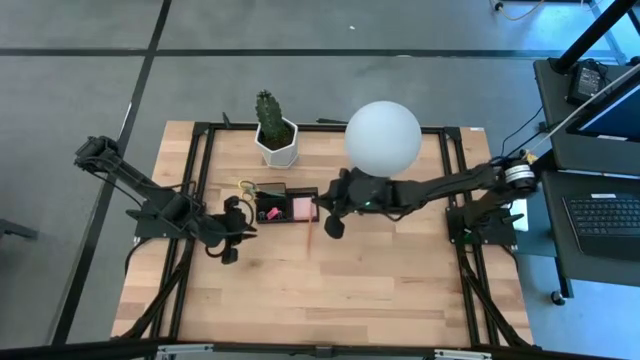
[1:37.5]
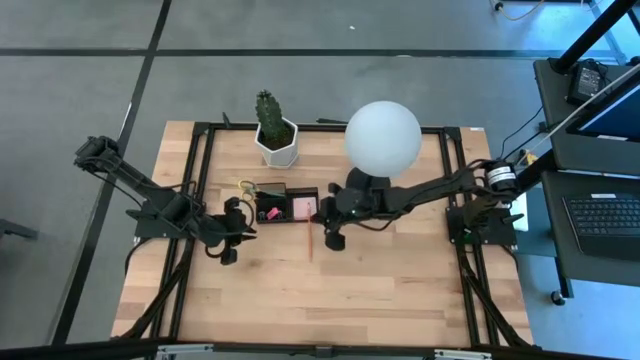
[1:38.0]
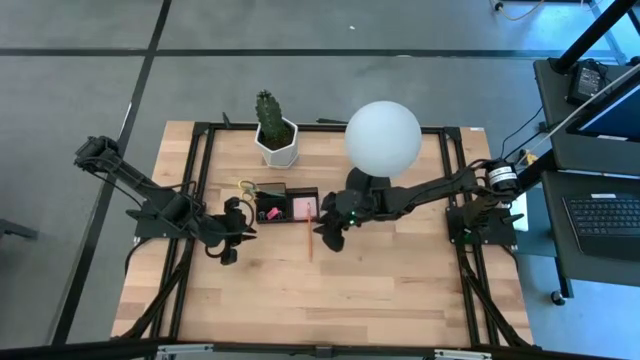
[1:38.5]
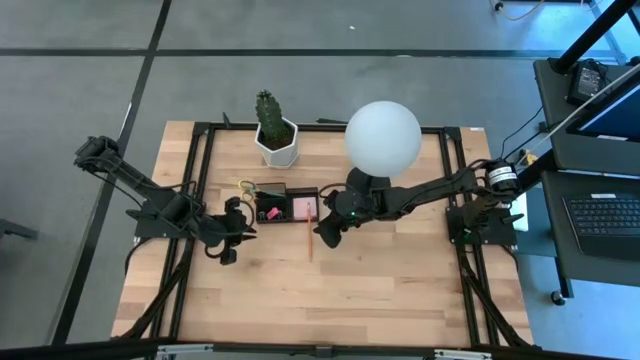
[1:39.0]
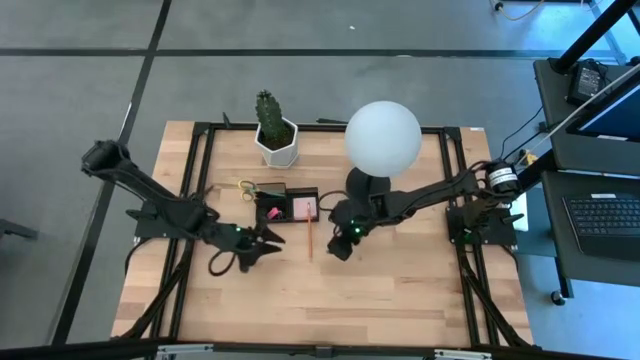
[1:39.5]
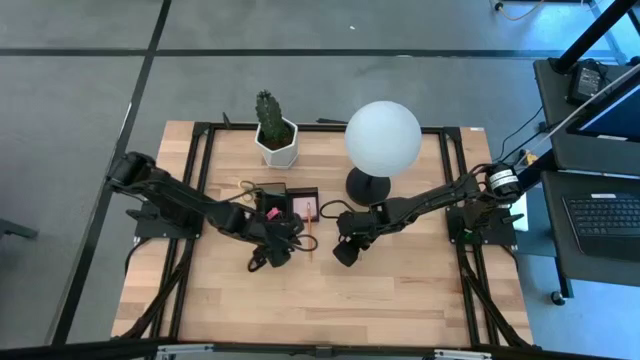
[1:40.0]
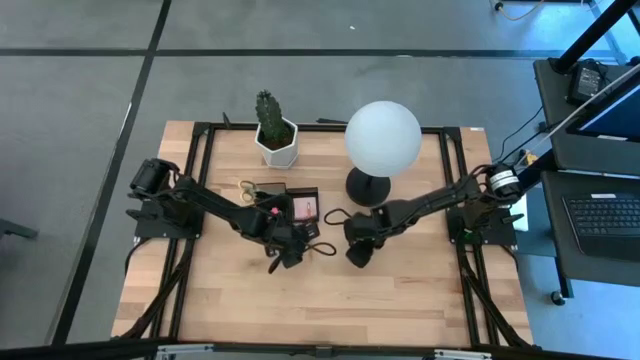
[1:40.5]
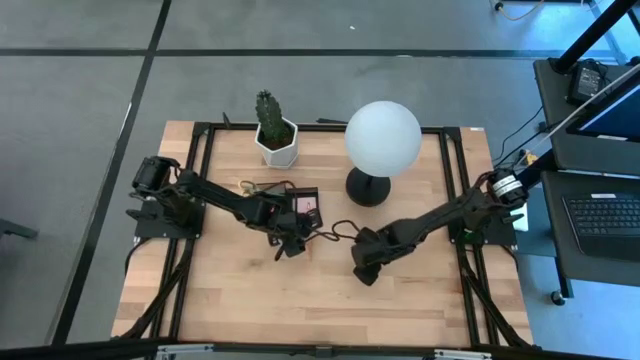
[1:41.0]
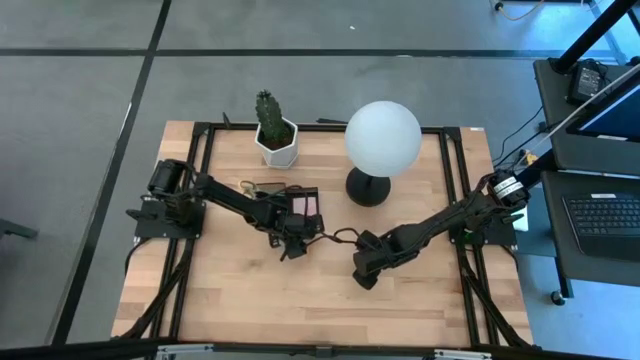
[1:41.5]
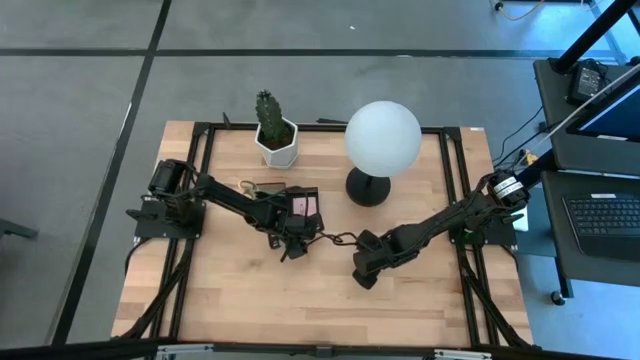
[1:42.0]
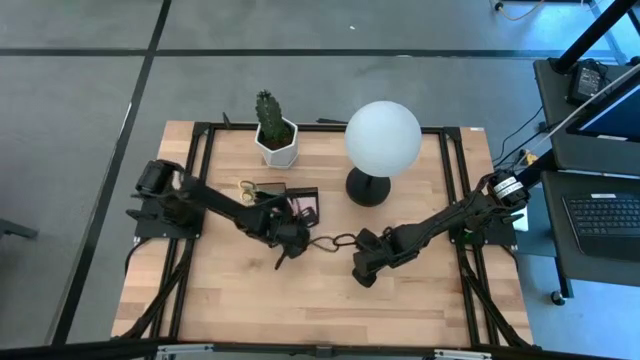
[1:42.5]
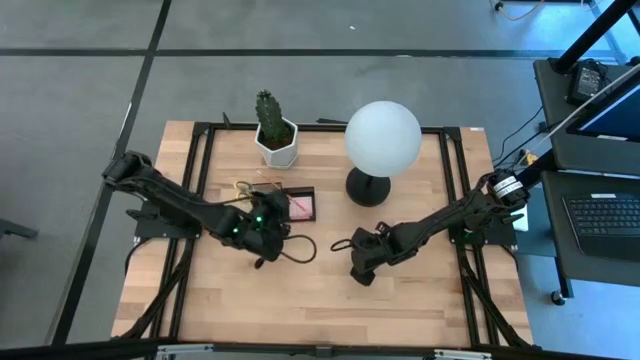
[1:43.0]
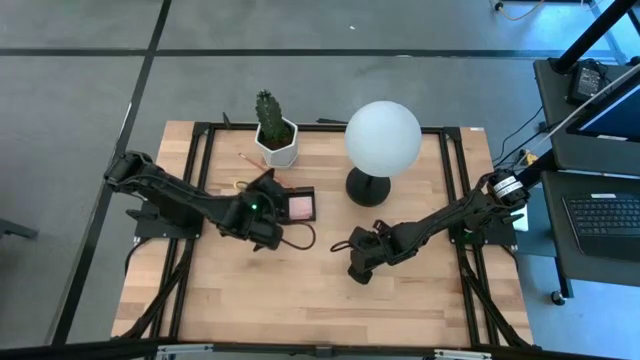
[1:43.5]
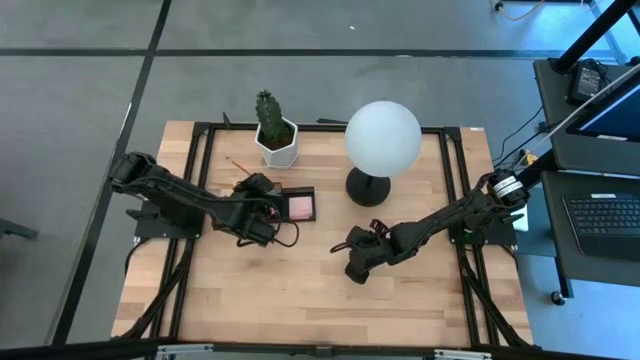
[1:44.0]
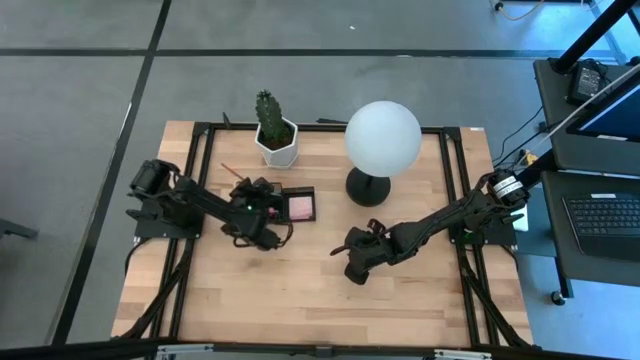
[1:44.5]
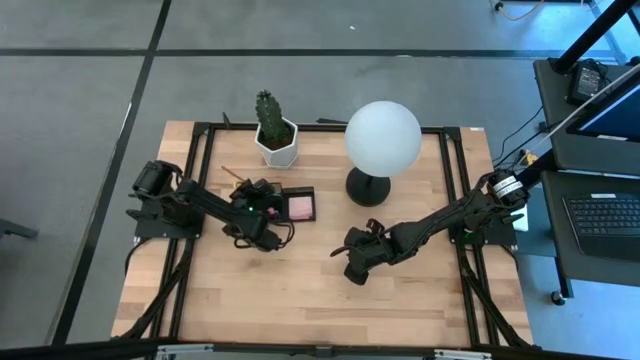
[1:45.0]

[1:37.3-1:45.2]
Task: Pick and place office supplies into organizer
Put the orange pencil into the black desk organizer

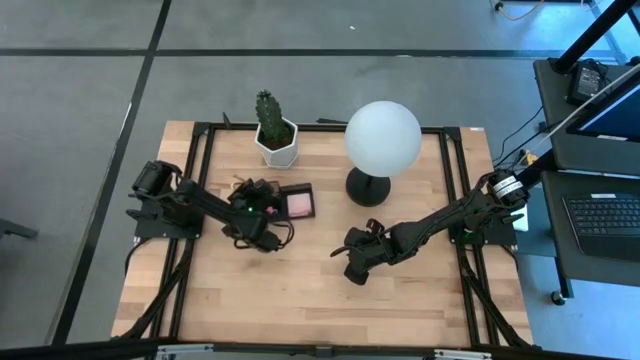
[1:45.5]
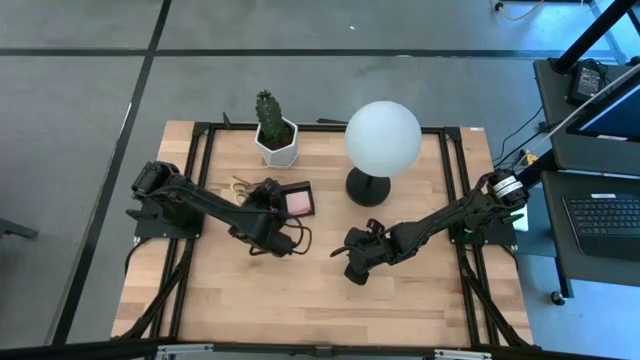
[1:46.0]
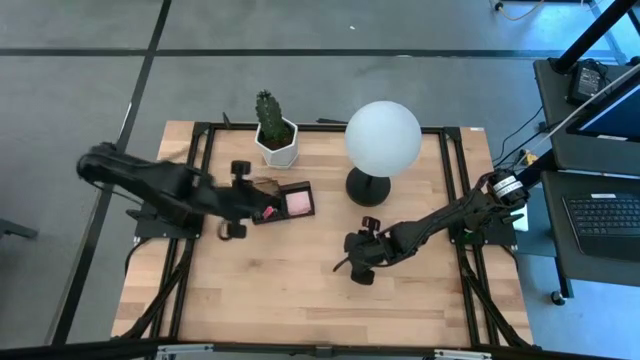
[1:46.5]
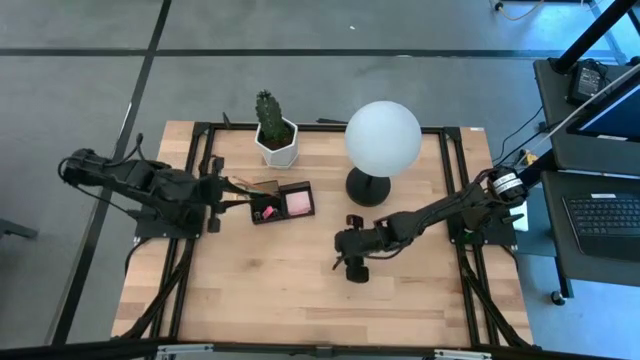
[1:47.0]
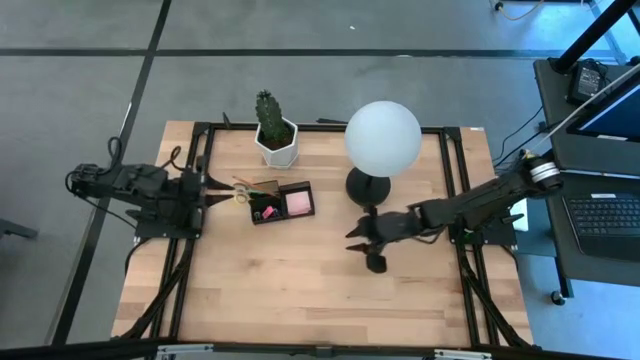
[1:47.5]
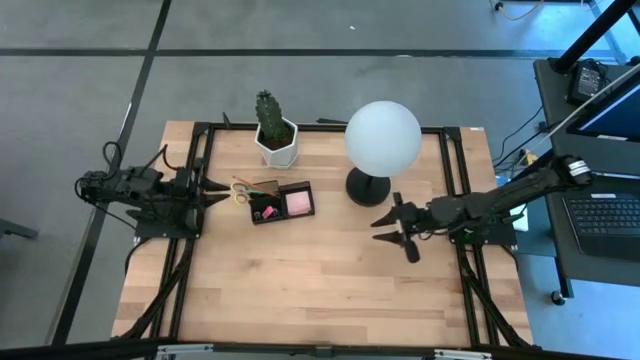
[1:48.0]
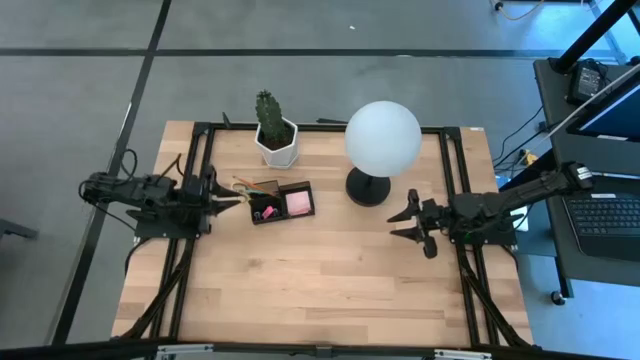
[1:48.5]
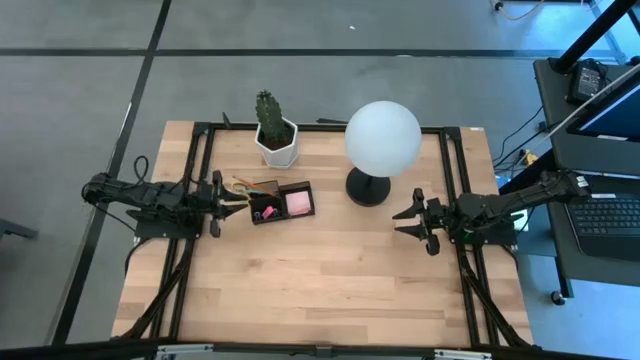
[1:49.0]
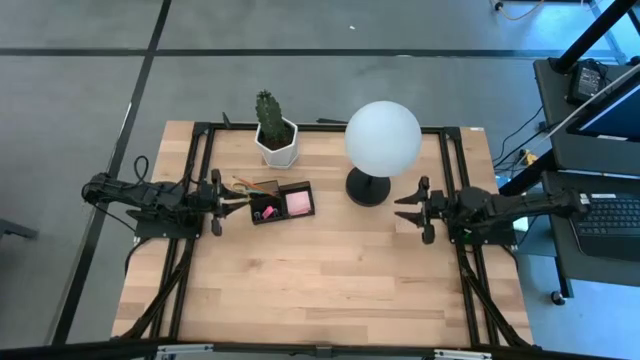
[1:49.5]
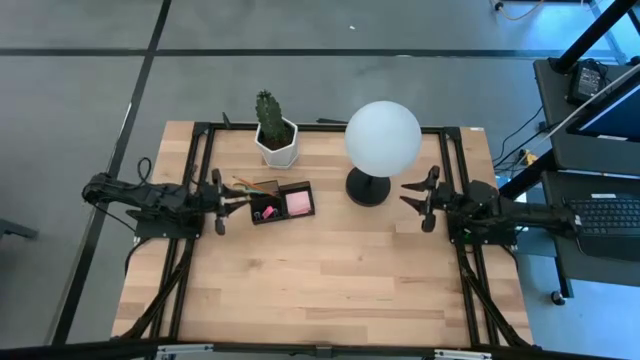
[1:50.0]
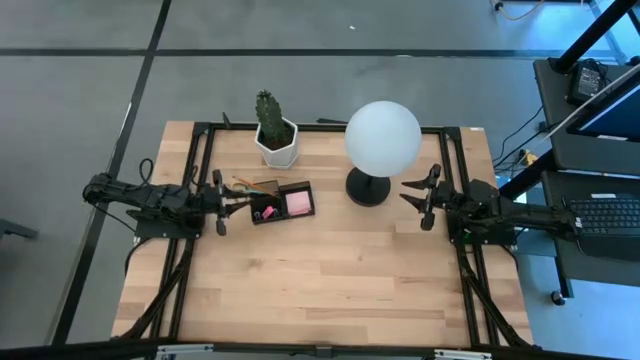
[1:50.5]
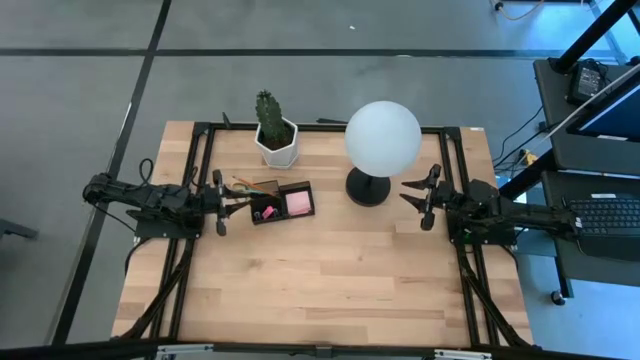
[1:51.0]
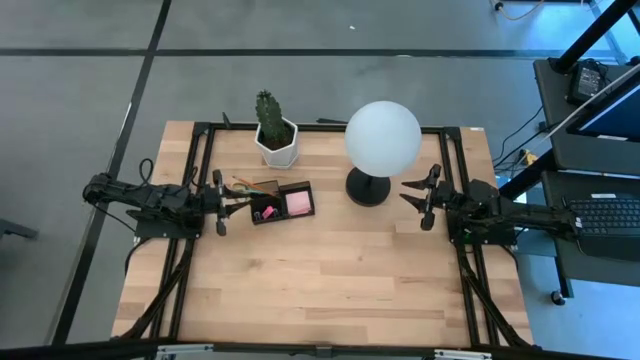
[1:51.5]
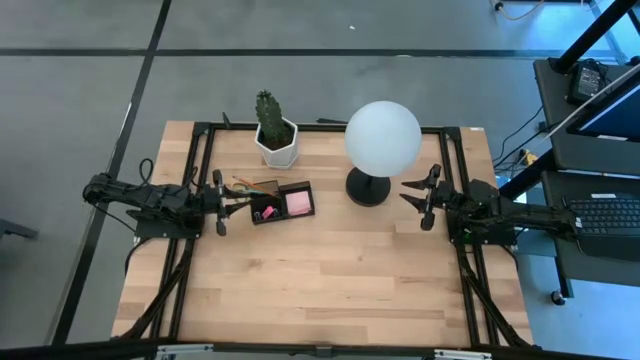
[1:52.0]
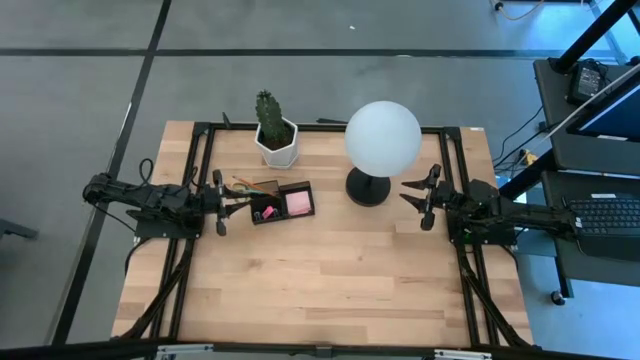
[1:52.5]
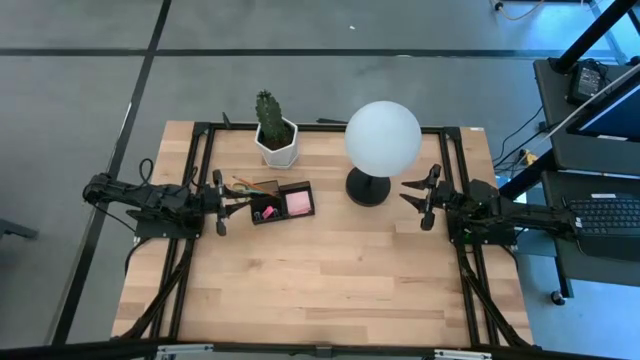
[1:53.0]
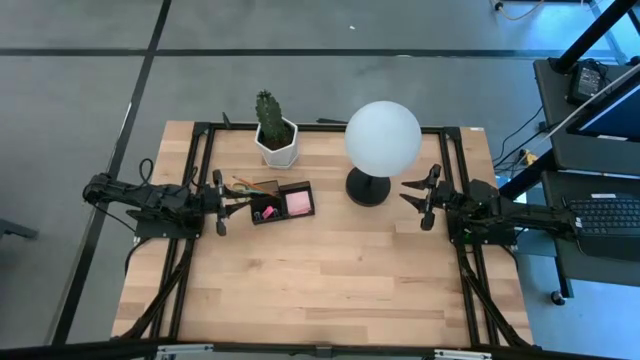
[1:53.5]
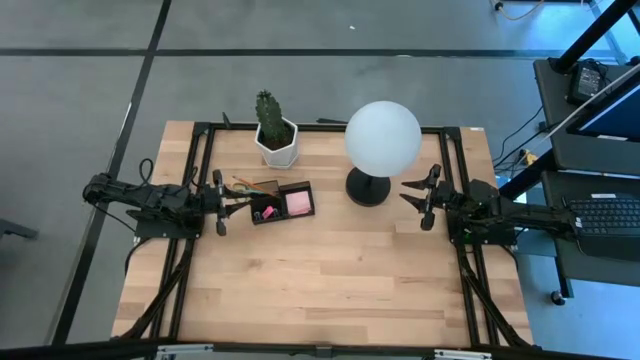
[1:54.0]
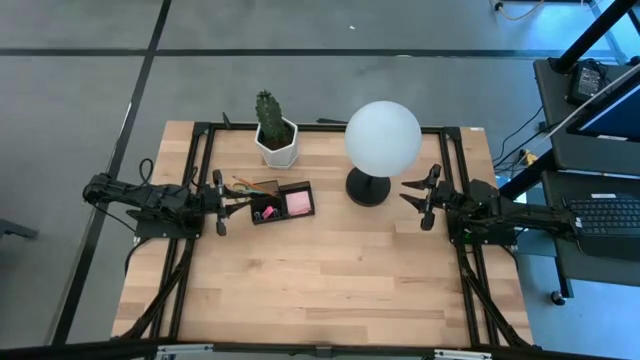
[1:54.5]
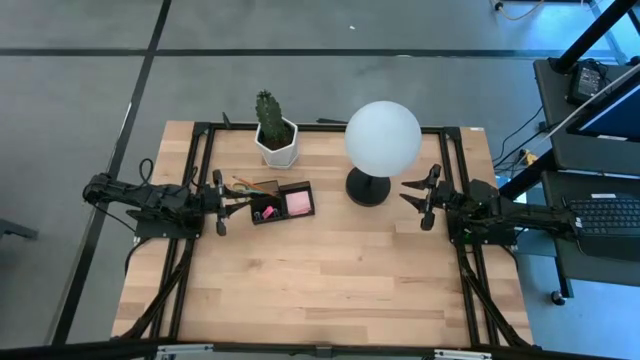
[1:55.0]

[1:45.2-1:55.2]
Return to Home Position

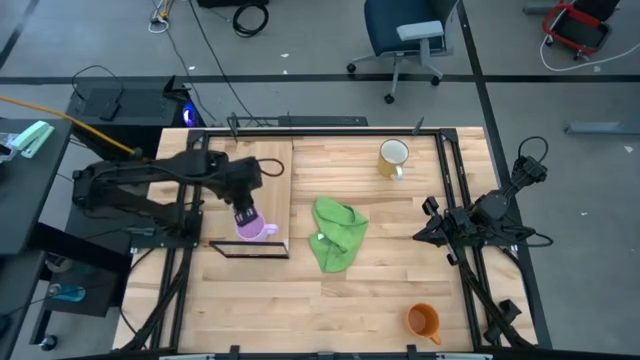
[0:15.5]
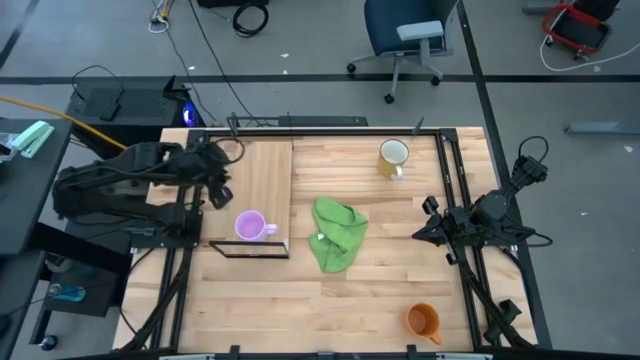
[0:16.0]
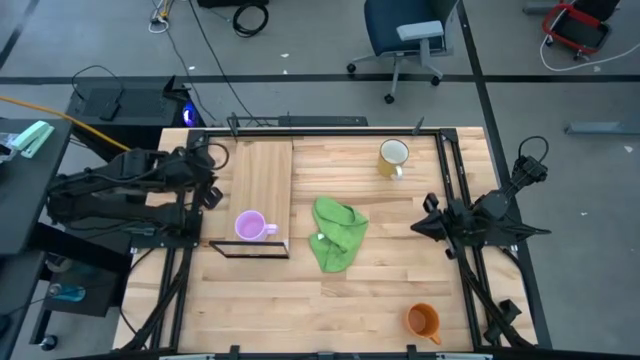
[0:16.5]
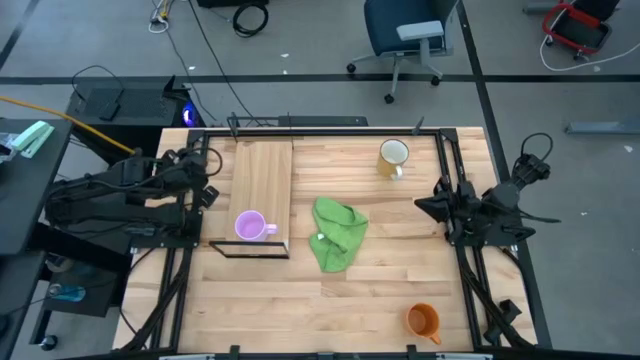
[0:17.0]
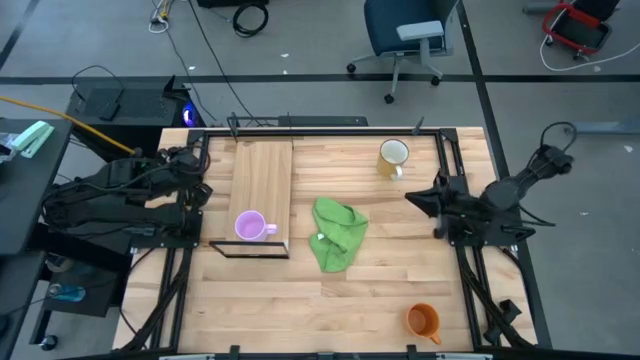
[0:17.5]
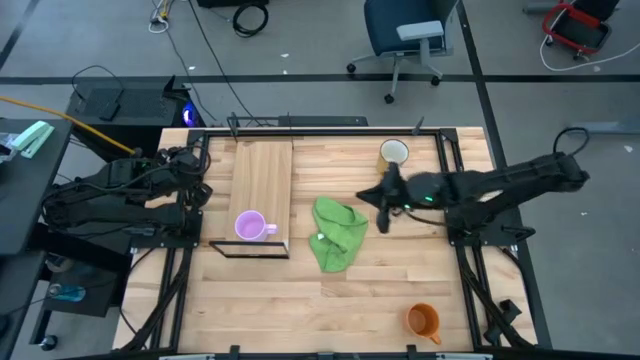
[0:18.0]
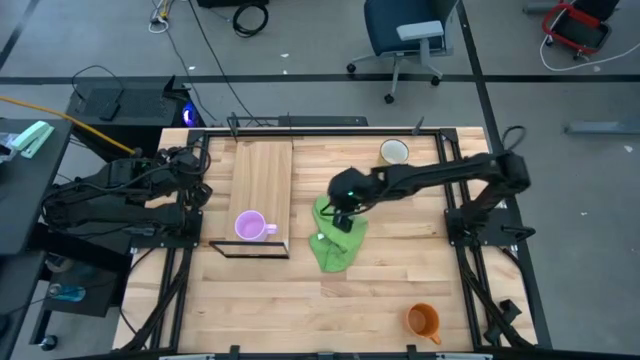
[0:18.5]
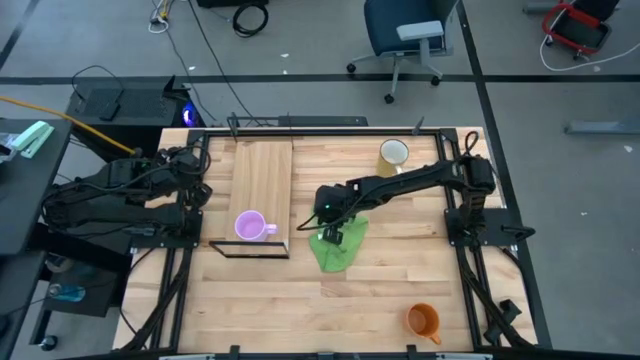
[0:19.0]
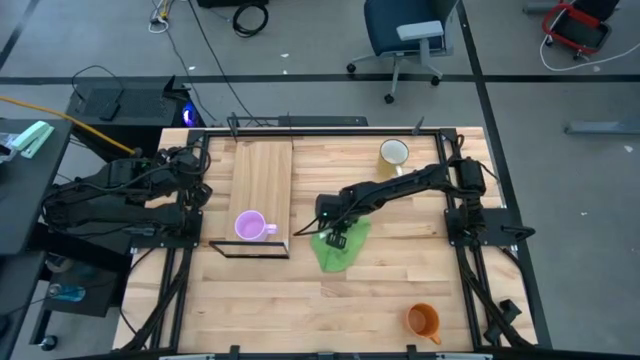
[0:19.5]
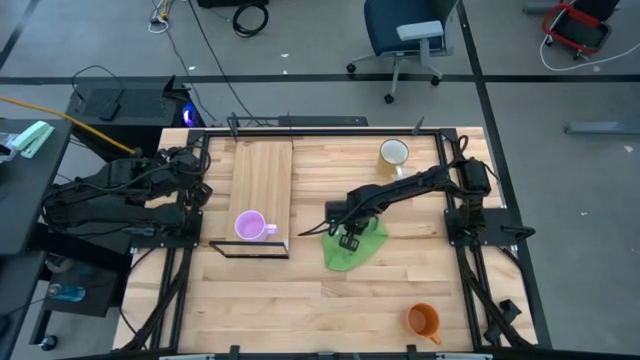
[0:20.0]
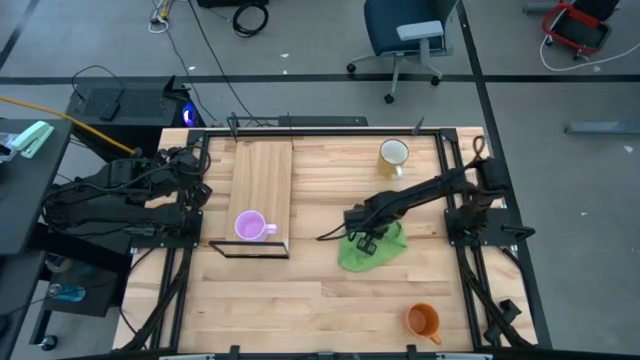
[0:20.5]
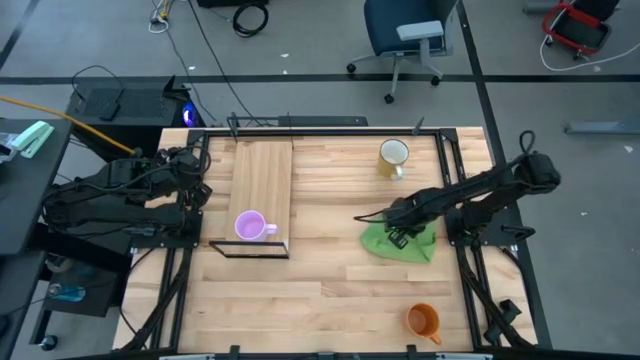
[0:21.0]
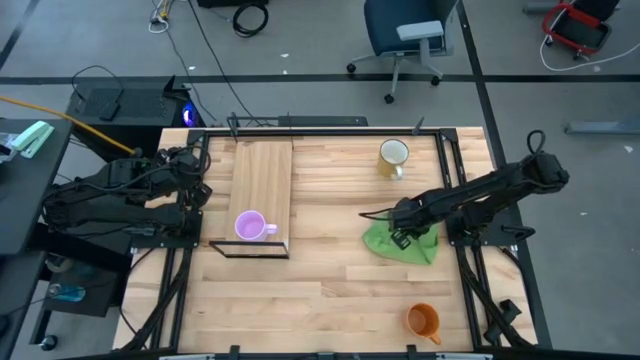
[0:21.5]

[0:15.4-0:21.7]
Task: Stack small to large cups/mugs on shelf
Move the green towel from middle to the right table
